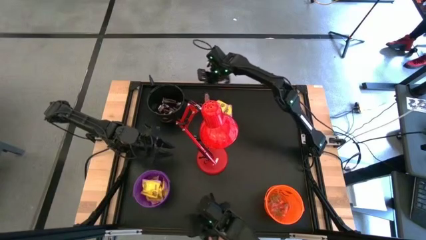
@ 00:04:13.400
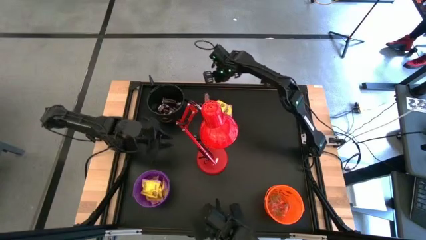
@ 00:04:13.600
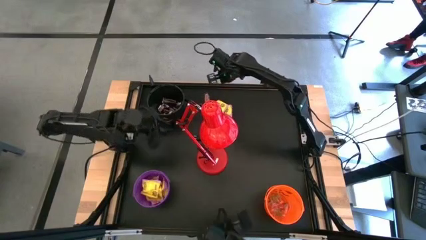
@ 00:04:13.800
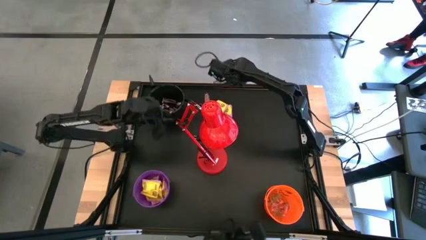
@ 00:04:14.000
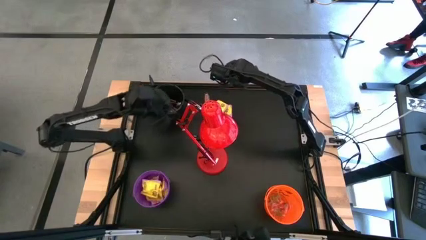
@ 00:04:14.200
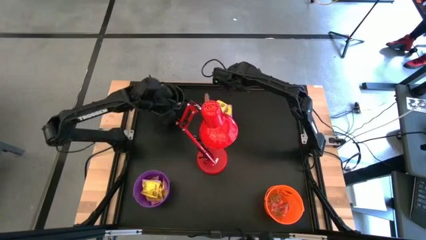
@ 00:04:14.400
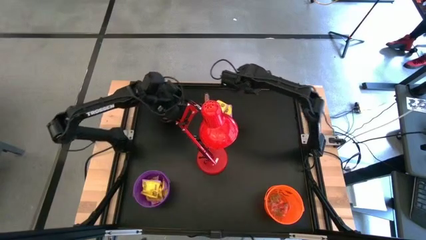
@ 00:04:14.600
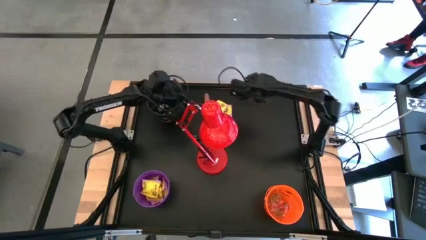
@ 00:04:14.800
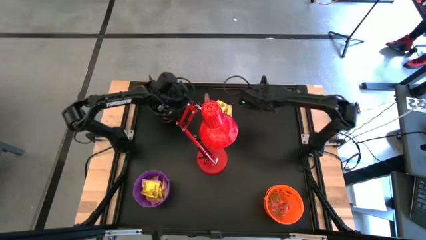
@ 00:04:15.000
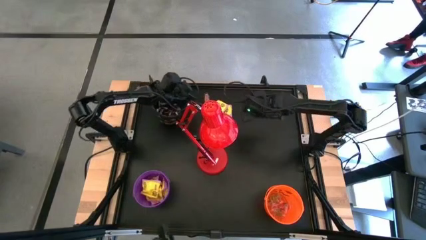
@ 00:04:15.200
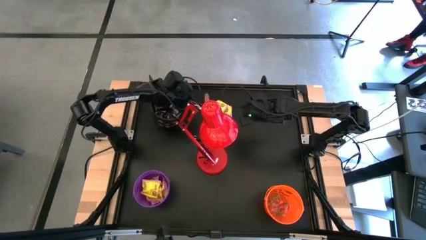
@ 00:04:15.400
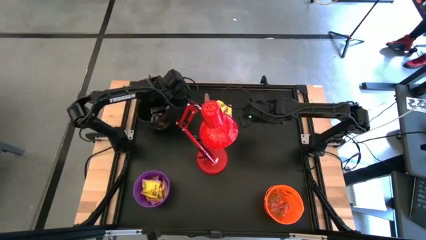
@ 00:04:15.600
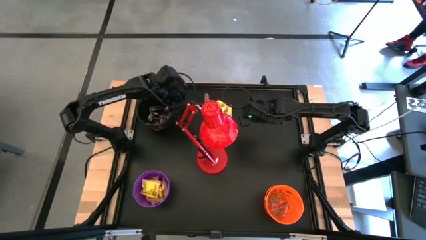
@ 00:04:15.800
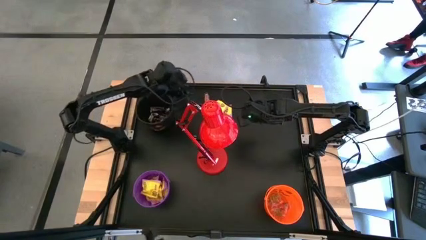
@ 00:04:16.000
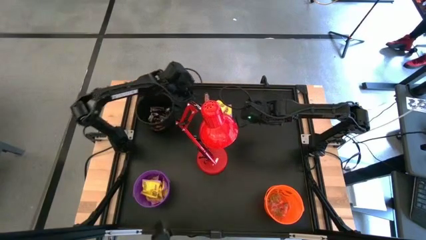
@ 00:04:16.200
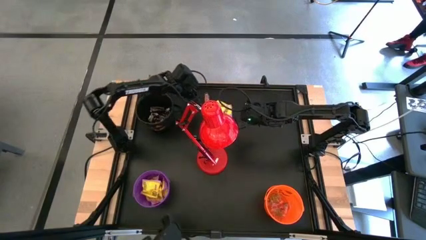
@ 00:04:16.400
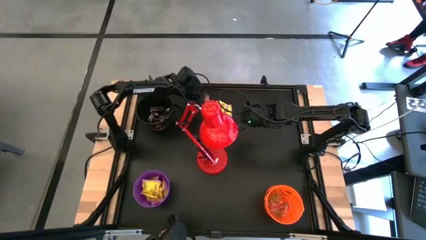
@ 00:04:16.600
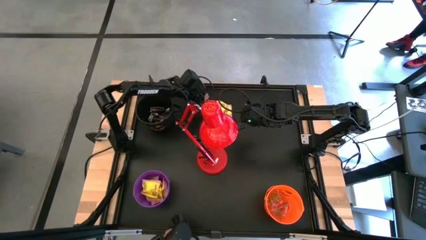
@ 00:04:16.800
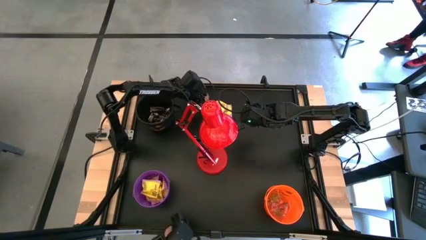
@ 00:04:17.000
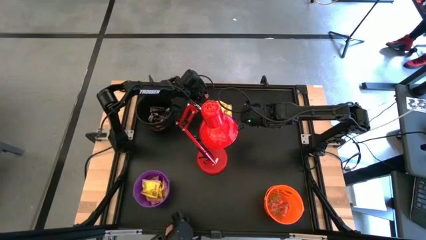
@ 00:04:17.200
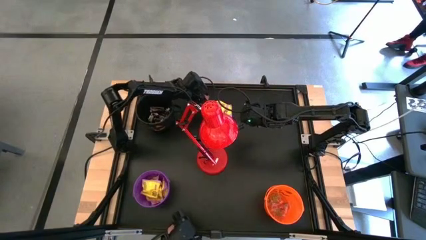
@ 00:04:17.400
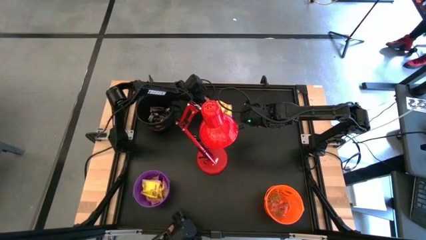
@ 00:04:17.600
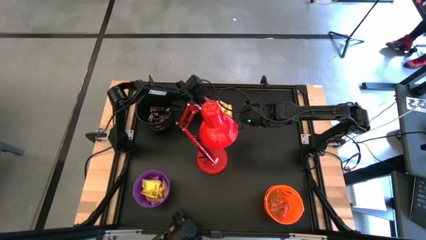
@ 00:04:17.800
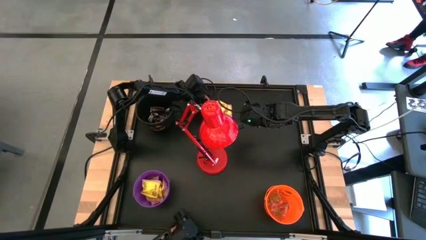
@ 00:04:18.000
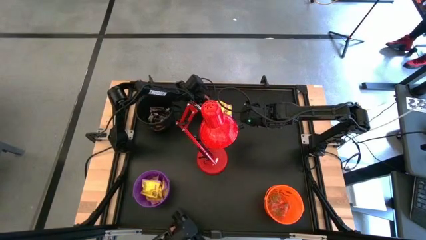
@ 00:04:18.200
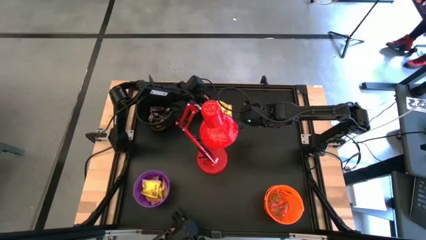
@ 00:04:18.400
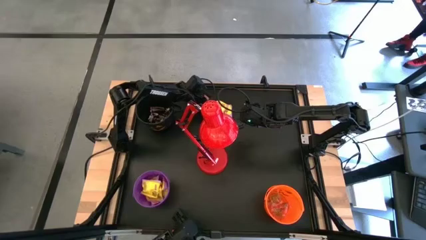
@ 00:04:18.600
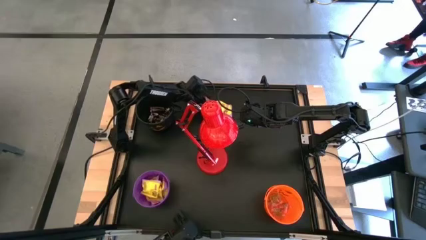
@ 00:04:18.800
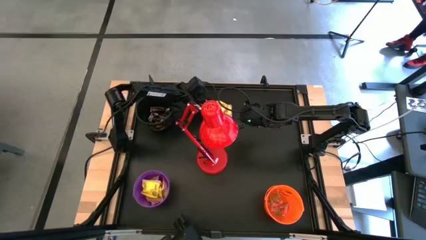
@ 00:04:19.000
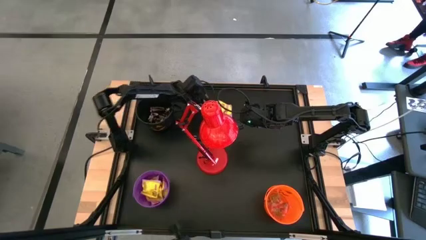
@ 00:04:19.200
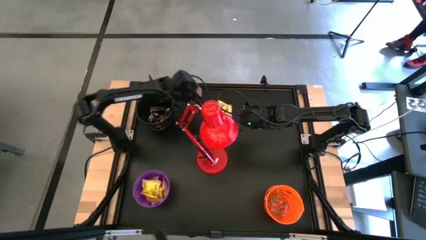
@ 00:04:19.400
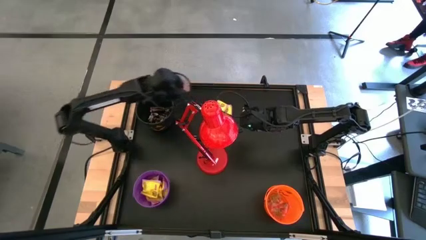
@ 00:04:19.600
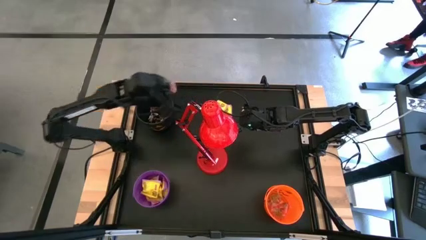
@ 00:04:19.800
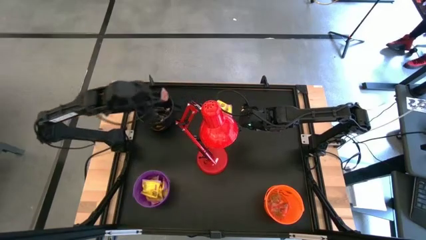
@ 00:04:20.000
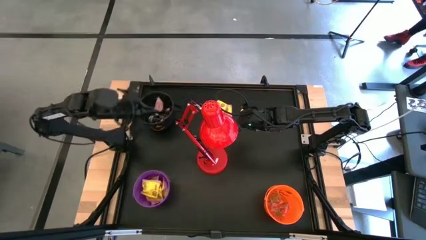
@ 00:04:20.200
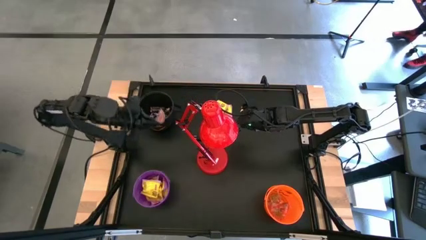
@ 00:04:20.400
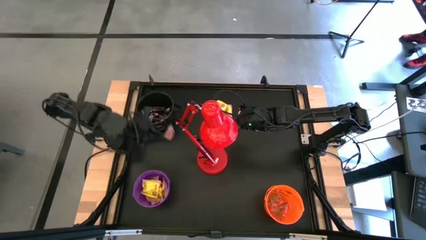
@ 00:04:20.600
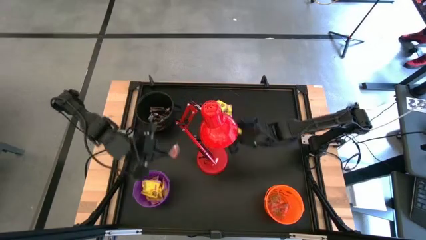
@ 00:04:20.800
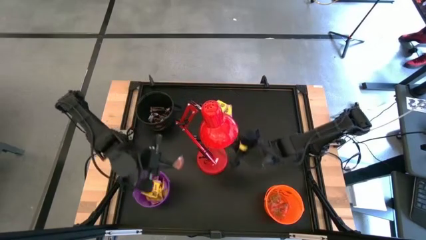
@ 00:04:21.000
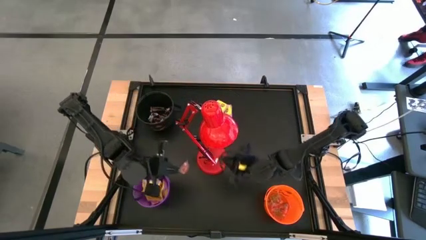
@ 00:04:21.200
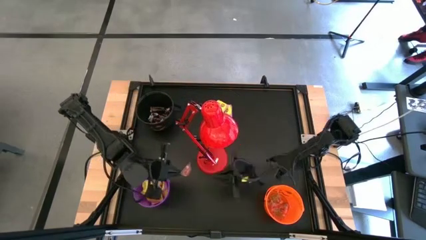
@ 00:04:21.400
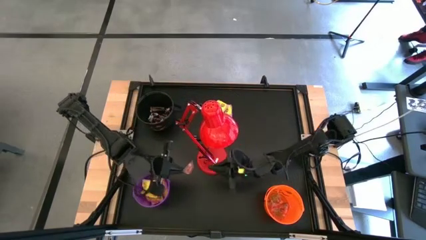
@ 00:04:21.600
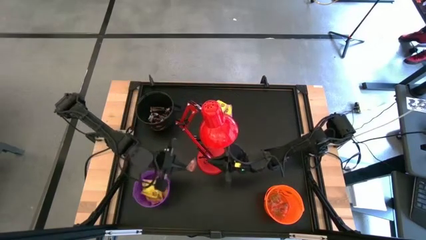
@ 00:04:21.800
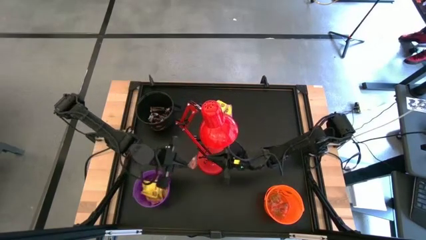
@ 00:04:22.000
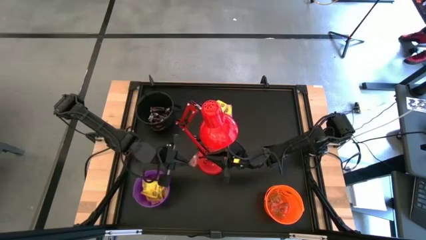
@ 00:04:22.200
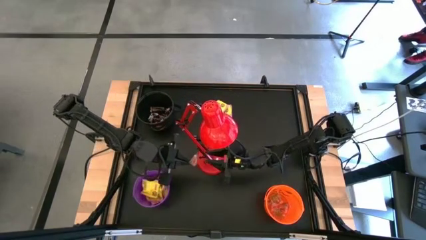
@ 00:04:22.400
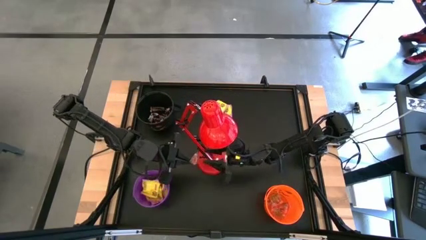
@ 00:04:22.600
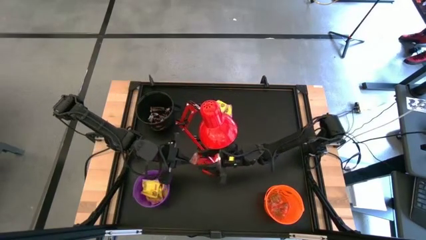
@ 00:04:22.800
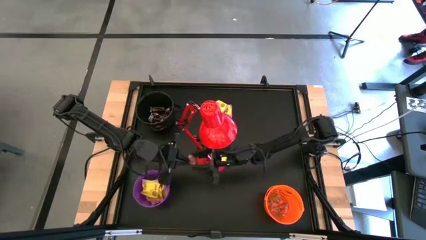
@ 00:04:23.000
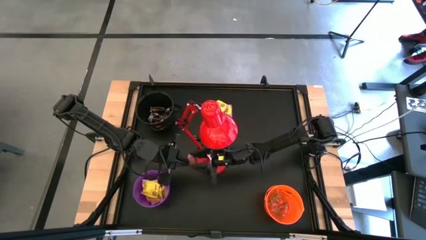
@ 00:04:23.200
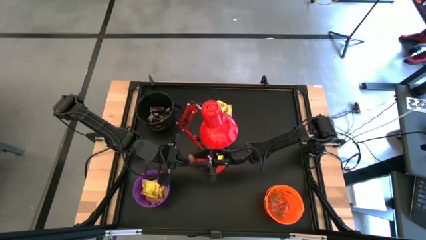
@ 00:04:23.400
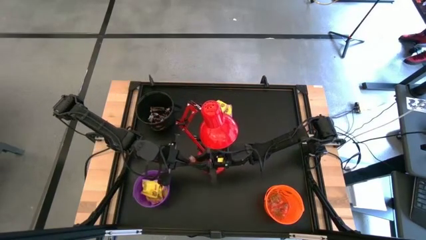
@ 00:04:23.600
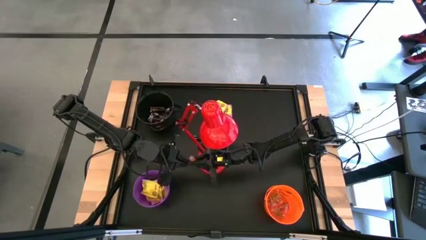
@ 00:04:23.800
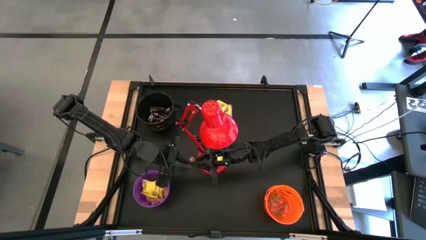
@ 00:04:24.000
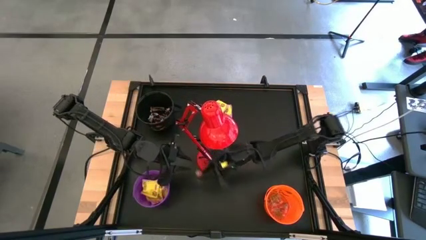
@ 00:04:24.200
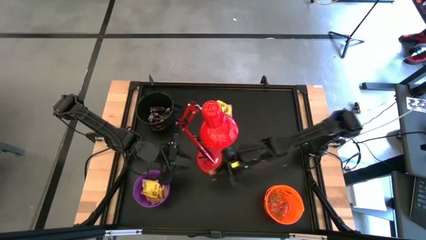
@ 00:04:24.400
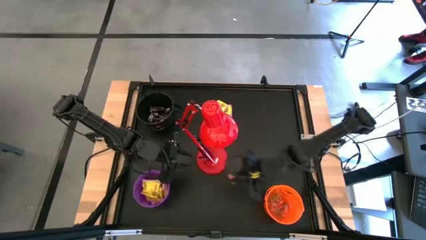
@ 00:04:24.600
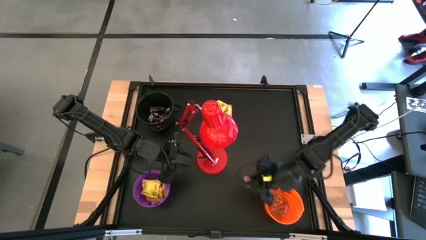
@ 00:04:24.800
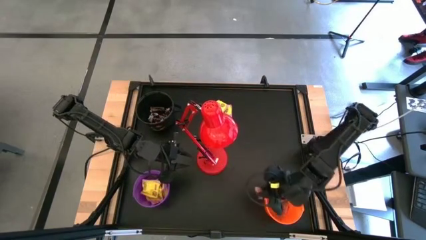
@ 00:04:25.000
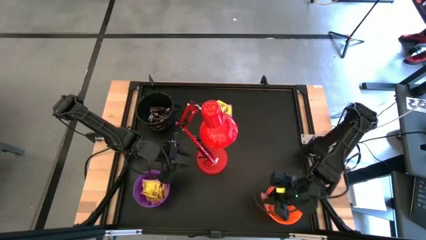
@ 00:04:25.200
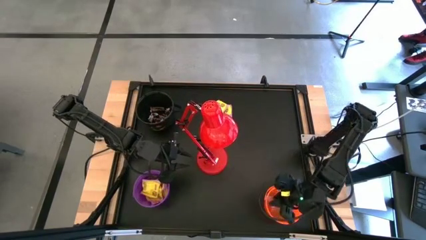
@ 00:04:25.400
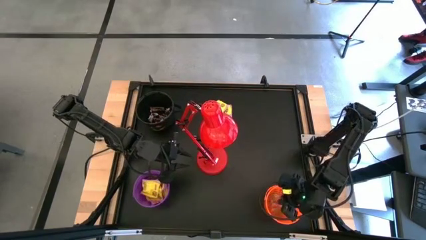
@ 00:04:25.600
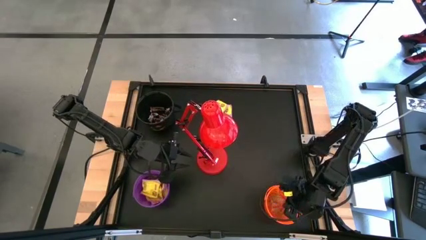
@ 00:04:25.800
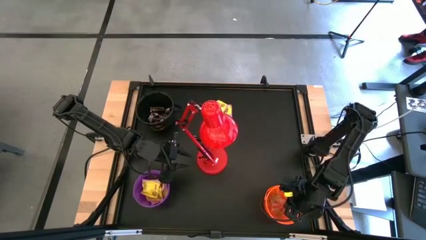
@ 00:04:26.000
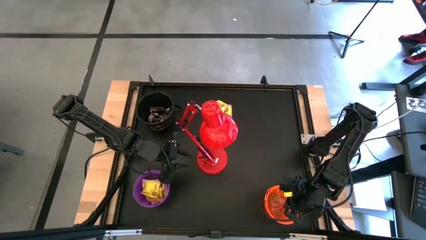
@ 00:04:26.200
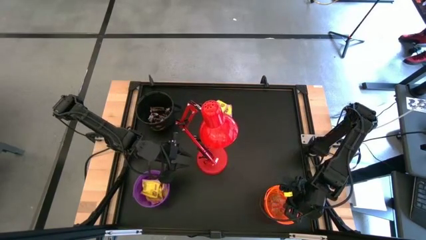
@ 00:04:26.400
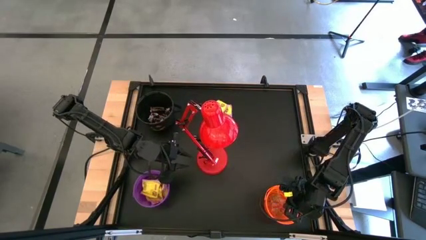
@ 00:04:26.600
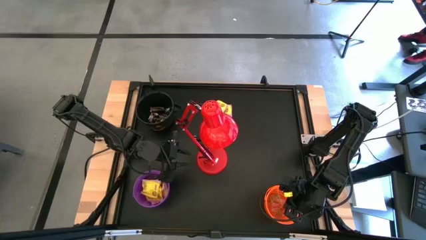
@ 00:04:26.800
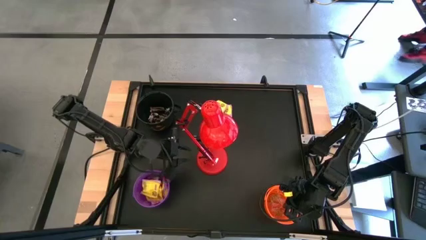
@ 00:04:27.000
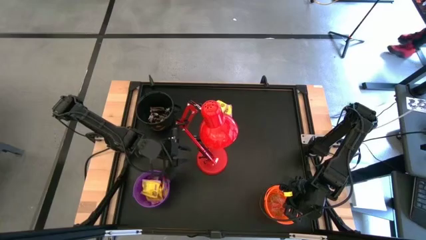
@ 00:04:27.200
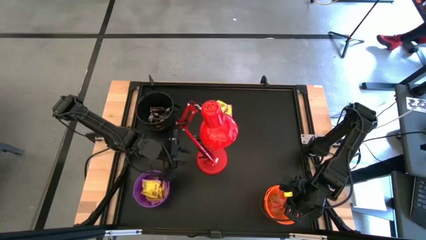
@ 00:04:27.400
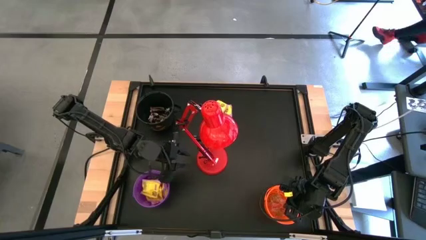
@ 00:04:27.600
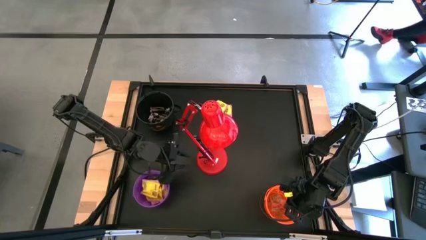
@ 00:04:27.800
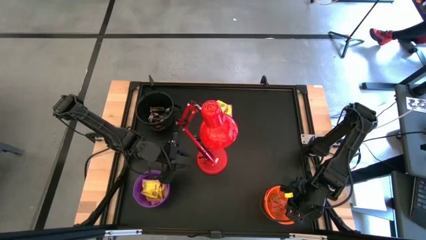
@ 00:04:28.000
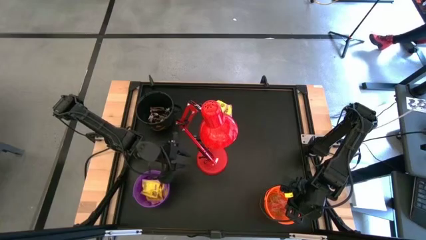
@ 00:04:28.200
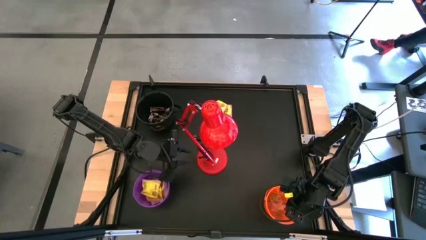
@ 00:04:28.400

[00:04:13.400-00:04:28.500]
Task: Organize candy in baskets
Put the orange gummy into the orange bucket
